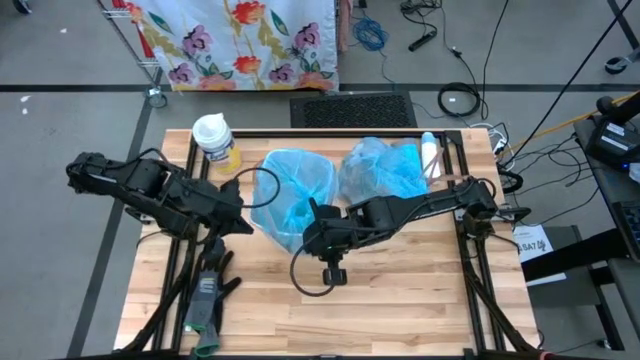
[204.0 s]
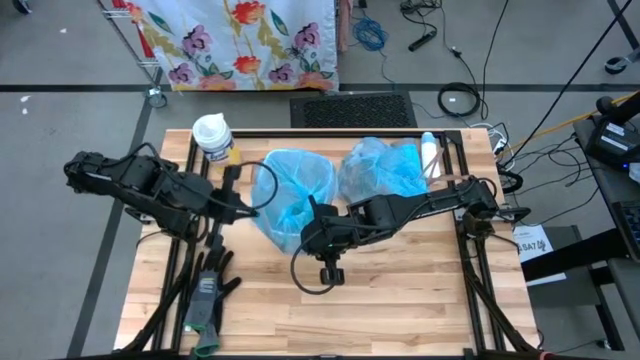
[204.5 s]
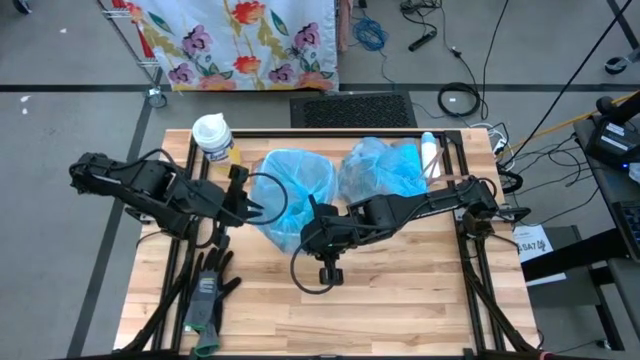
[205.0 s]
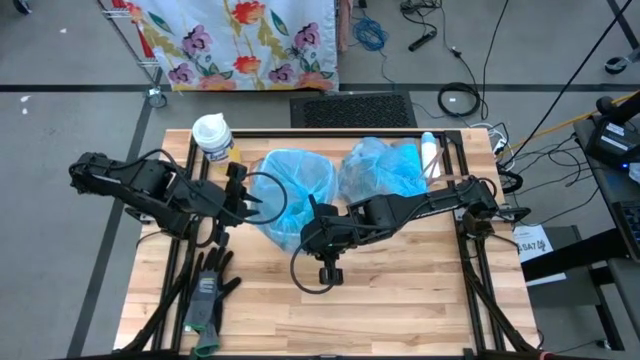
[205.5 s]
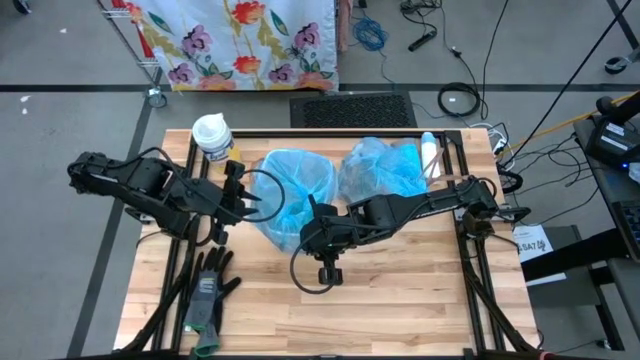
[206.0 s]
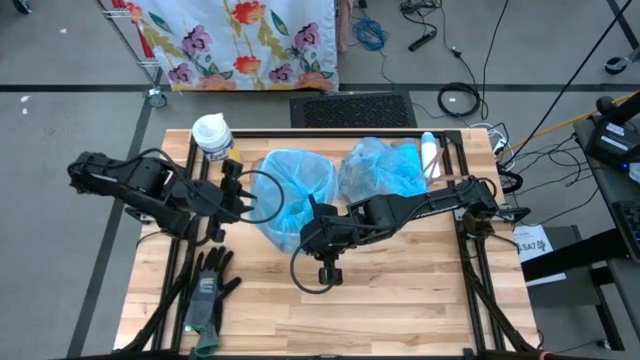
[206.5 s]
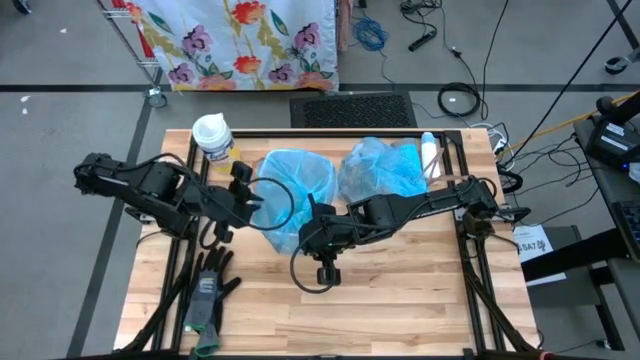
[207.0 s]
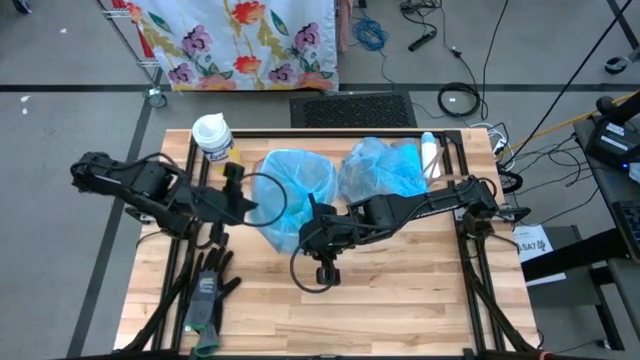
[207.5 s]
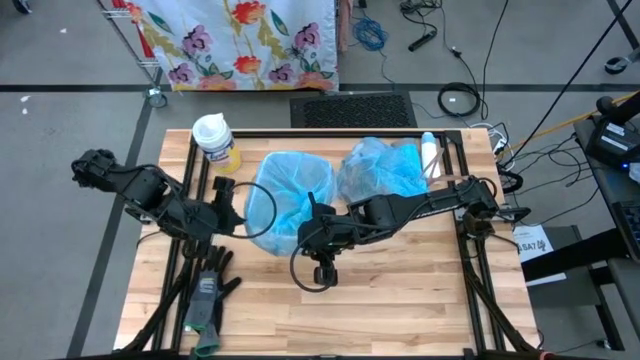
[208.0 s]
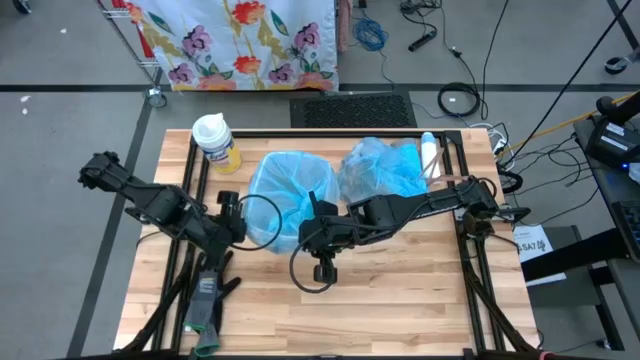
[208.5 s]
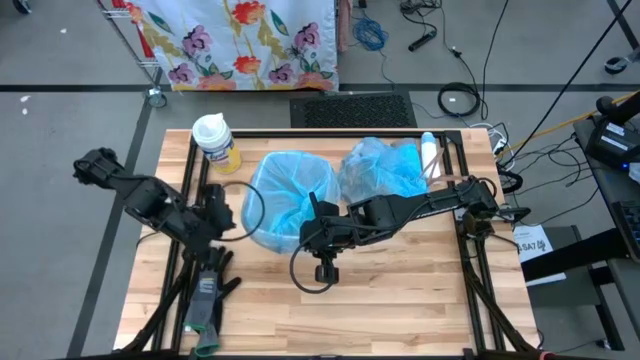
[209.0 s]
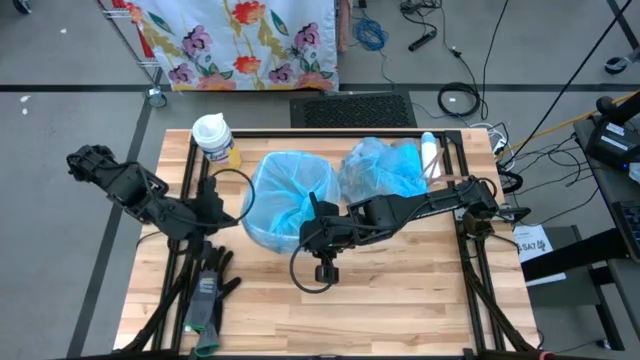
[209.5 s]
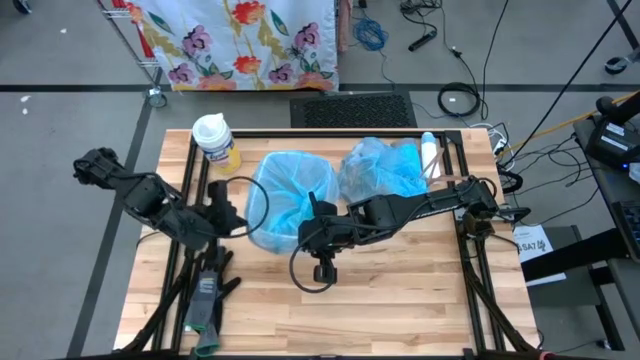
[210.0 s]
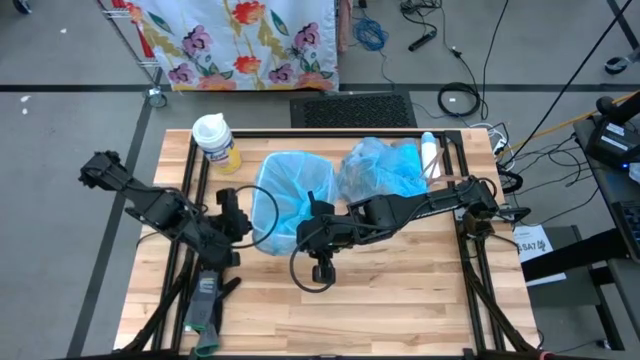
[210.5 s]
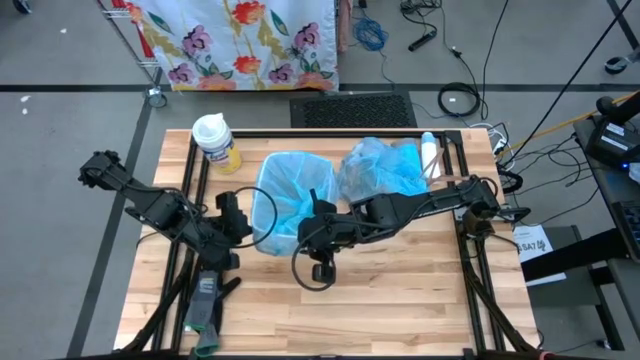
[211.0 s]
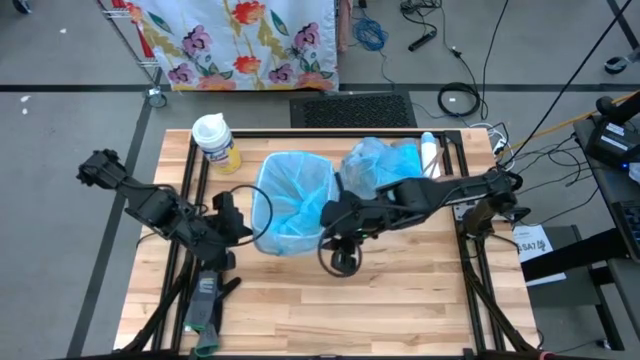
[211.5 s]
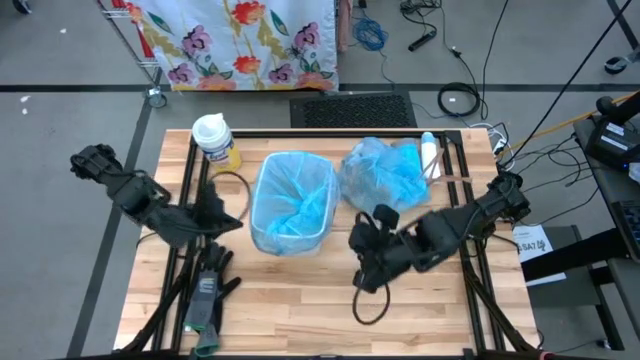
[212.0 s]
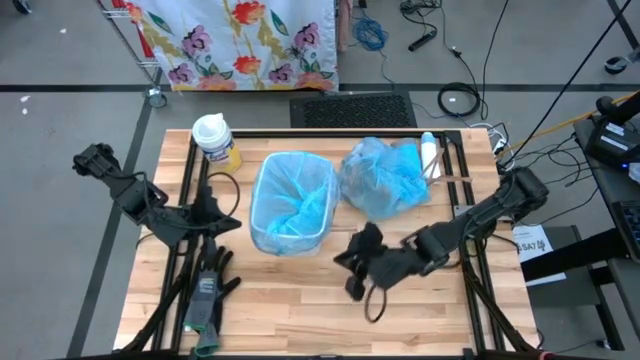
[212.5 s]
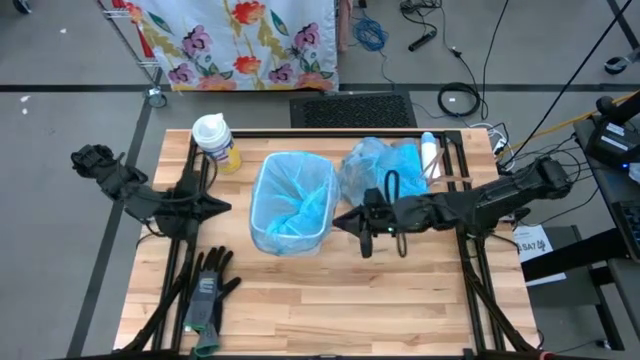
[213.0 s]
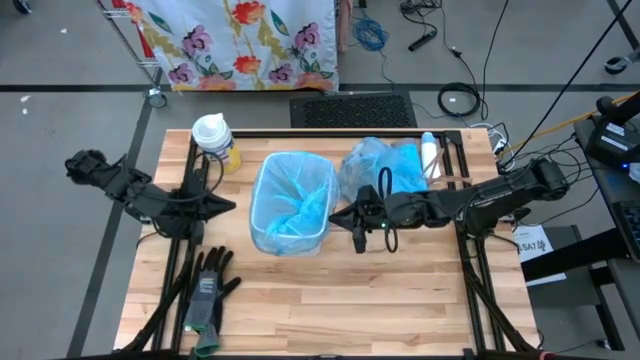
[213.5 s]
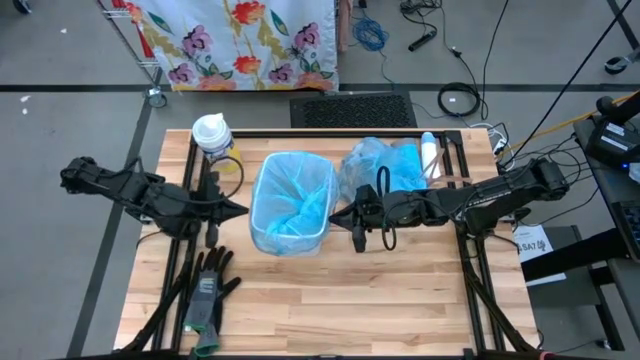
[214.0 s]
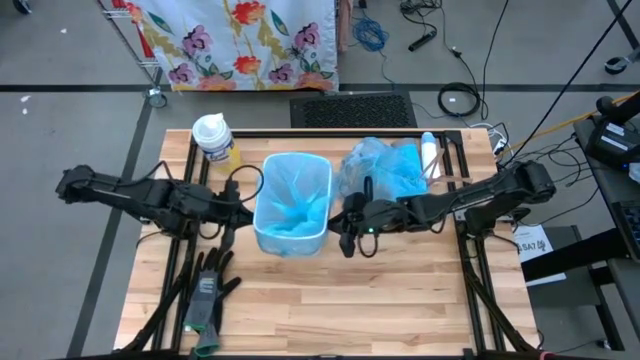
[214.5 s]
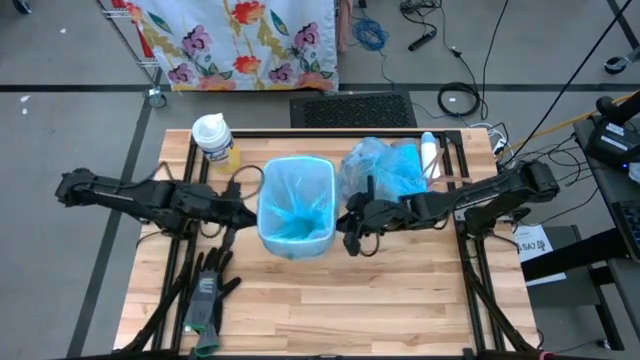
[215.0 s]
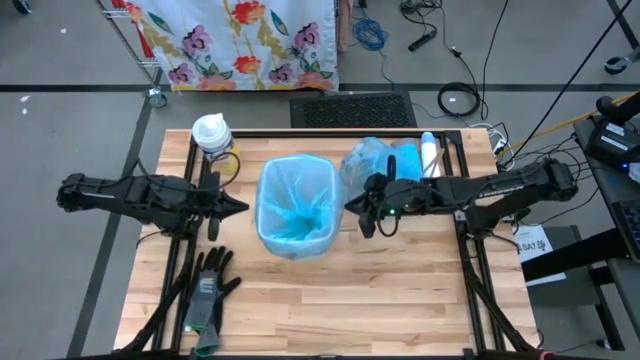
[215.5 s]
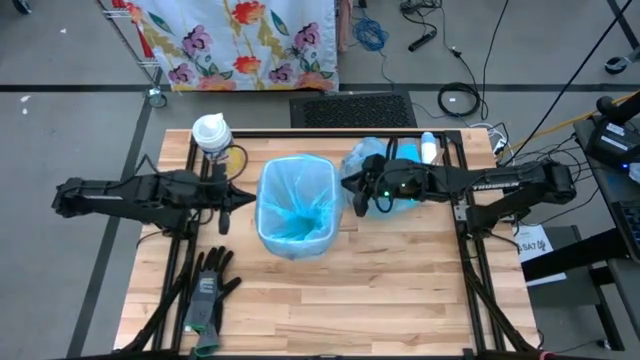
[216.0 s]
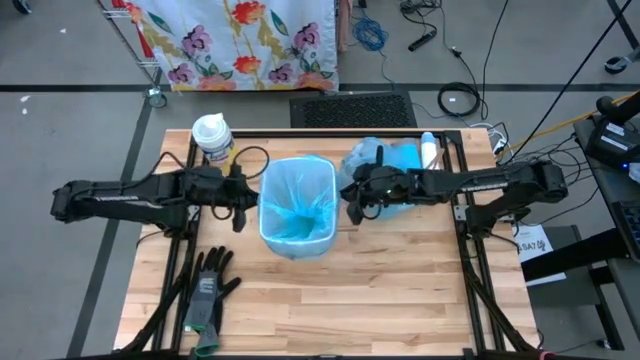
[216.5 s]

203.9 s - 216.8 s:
Task: place trash/remove bag and relplace
Insert the new trash bag into the trash bin

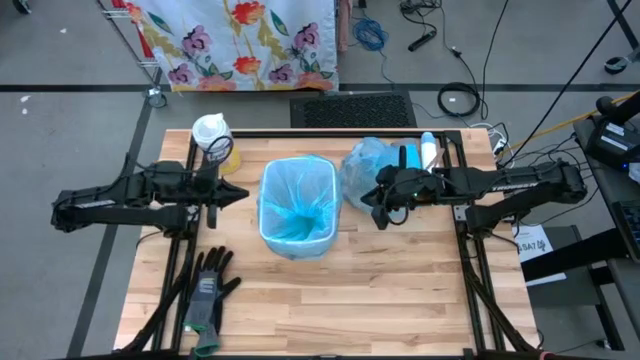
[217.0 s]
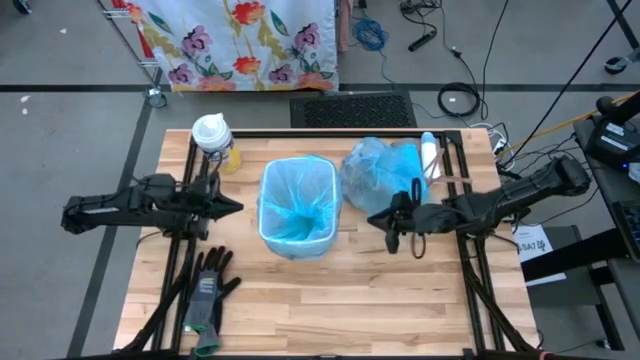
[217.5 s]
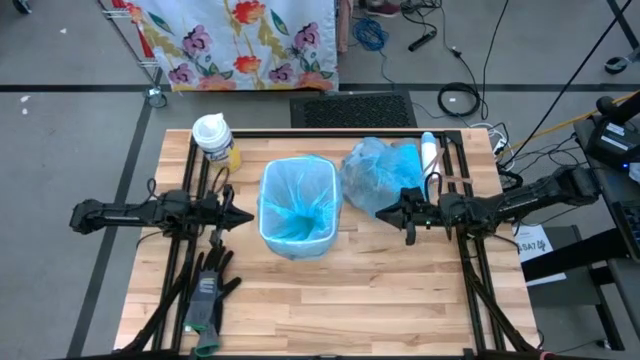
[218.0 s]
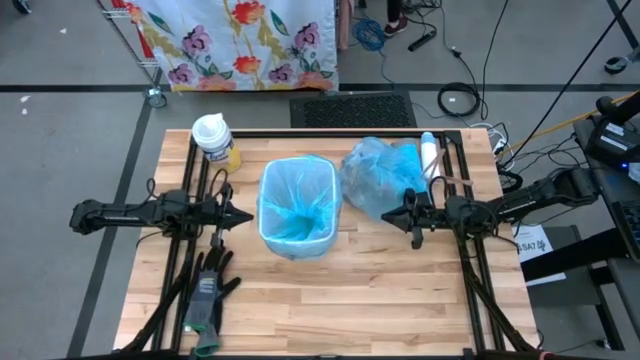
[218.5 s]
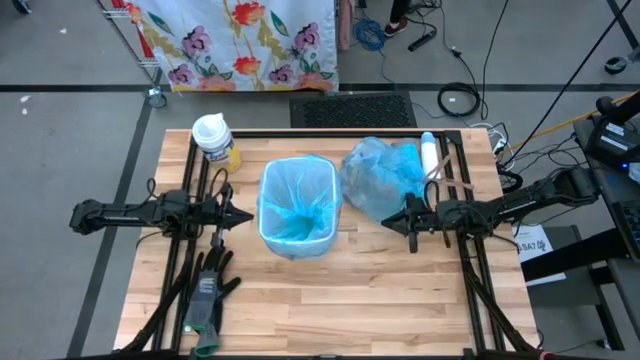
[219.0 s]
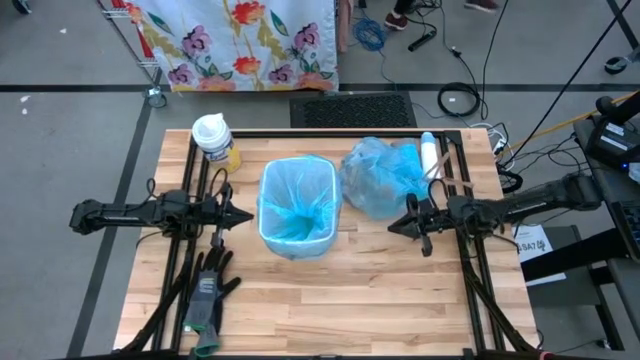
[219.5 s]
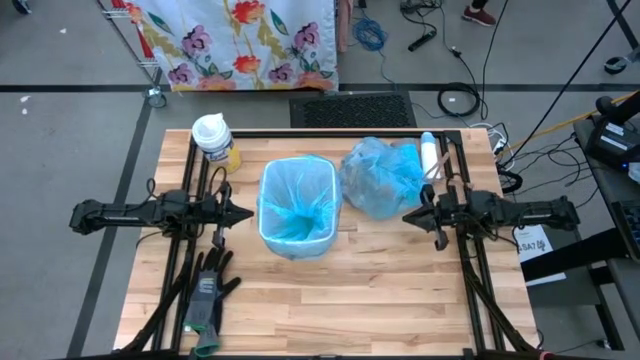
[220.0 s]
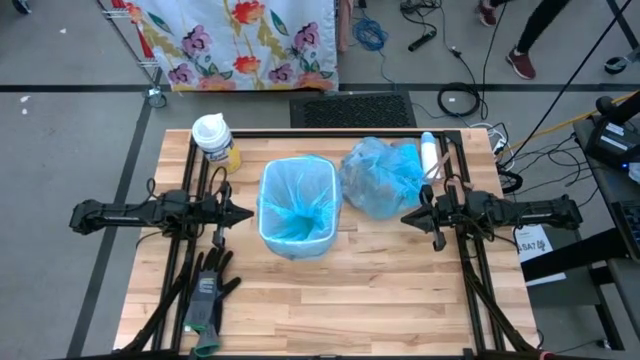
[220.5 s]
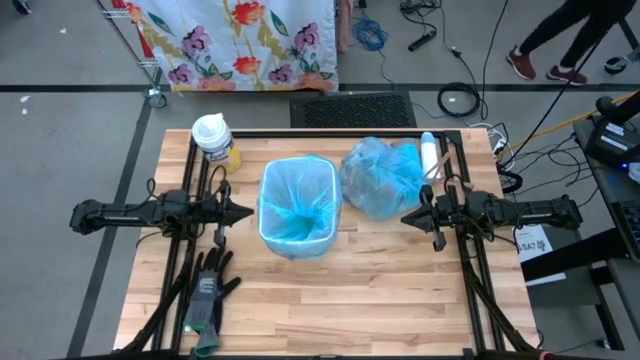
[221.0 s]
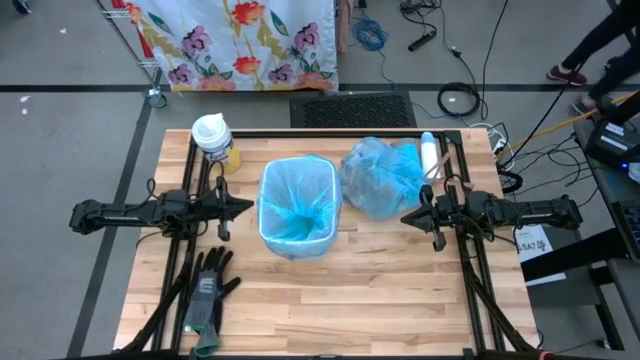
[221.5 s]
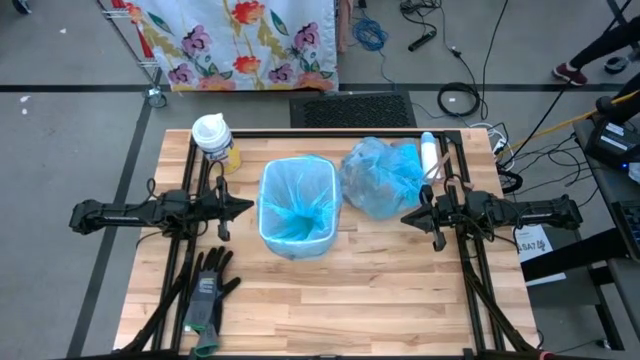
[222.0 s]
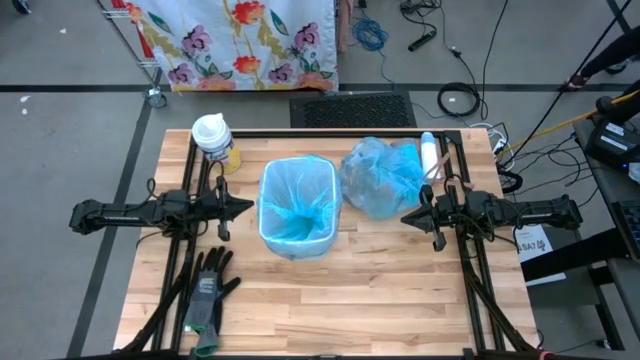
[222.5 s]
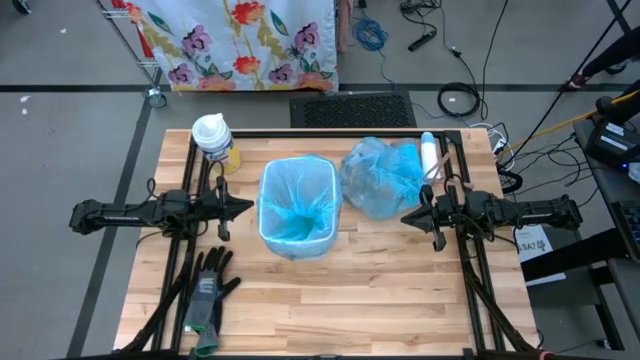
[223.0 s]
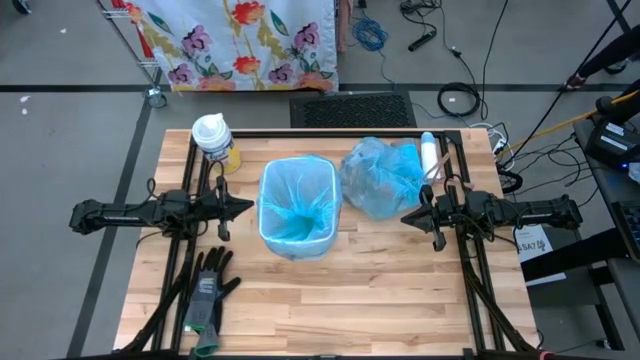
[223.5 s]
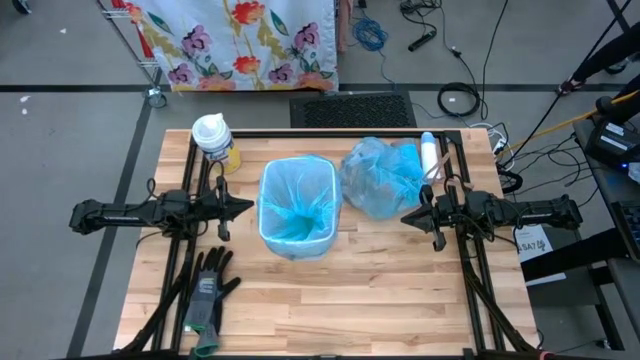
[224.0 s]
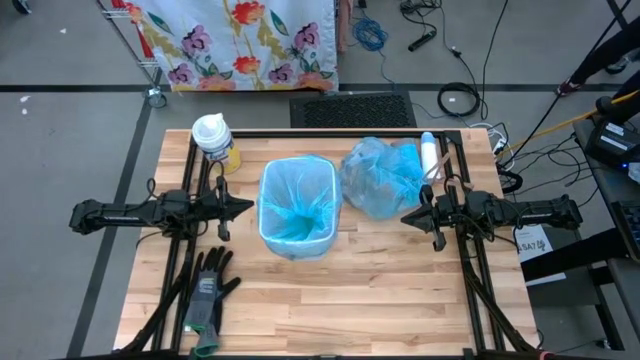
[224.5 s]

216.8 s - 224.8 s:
Return to Home Position
